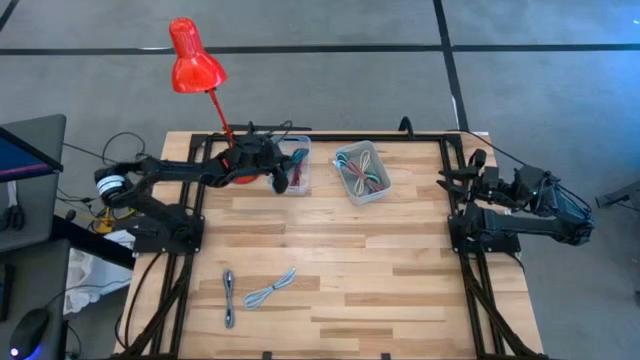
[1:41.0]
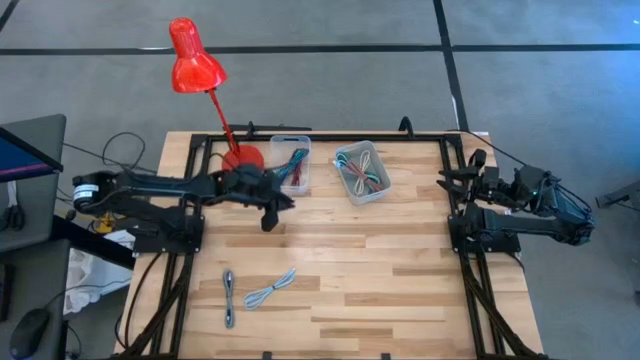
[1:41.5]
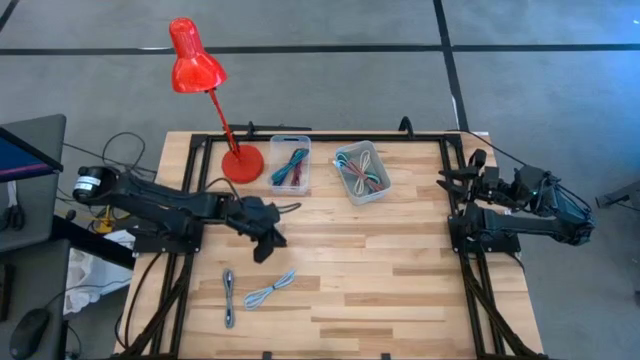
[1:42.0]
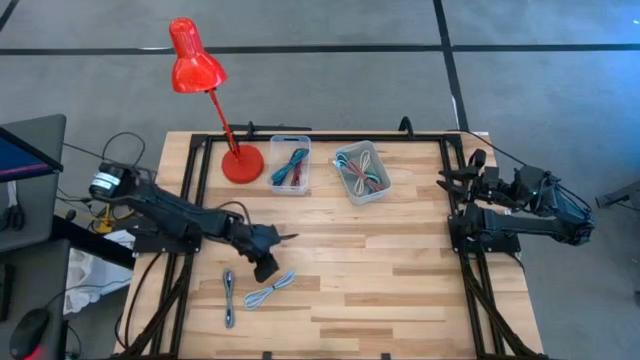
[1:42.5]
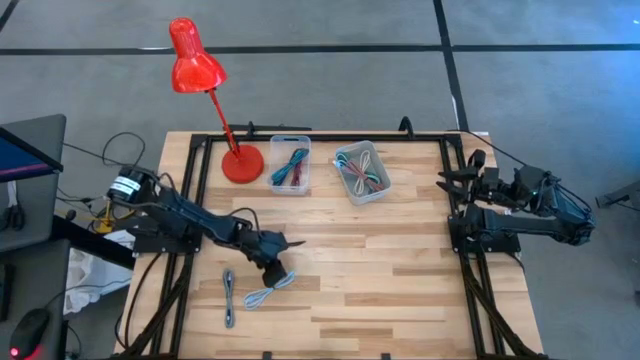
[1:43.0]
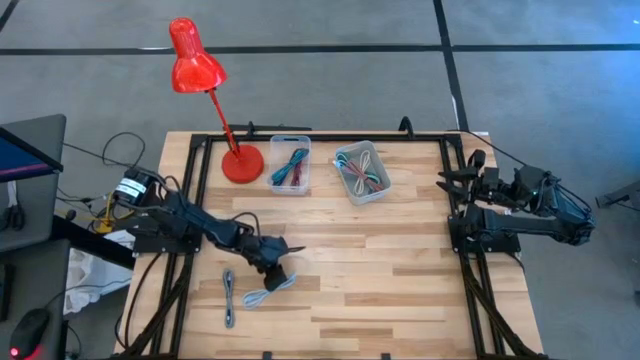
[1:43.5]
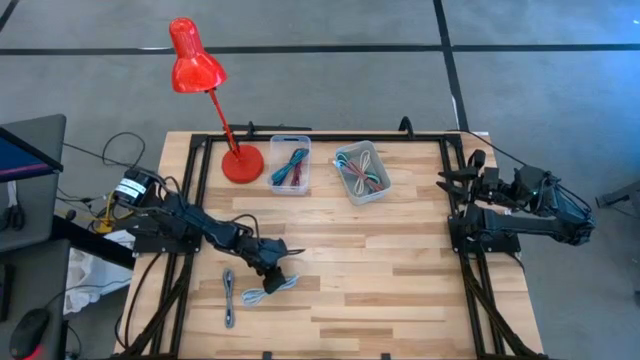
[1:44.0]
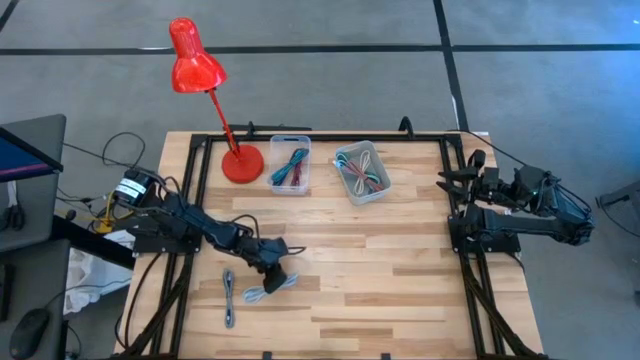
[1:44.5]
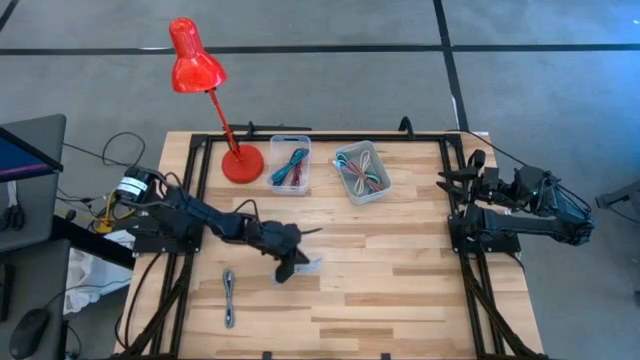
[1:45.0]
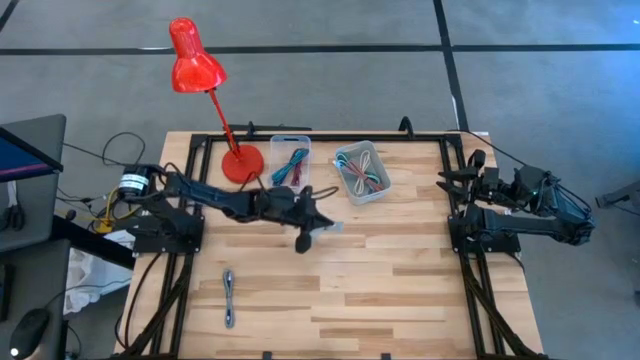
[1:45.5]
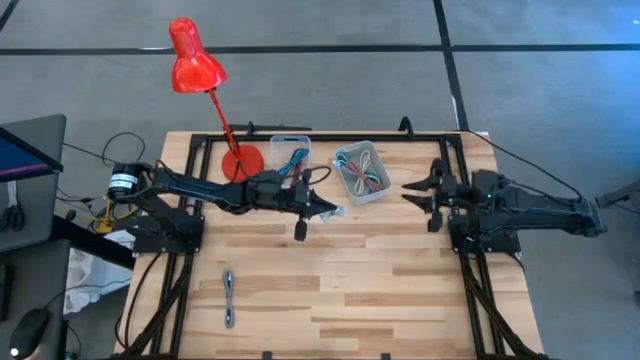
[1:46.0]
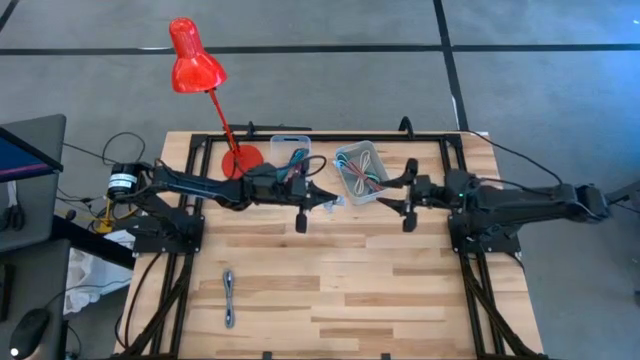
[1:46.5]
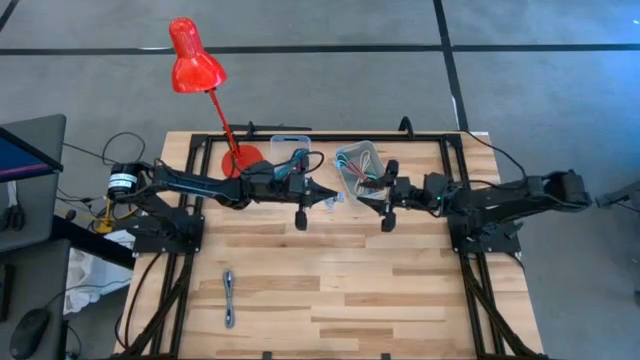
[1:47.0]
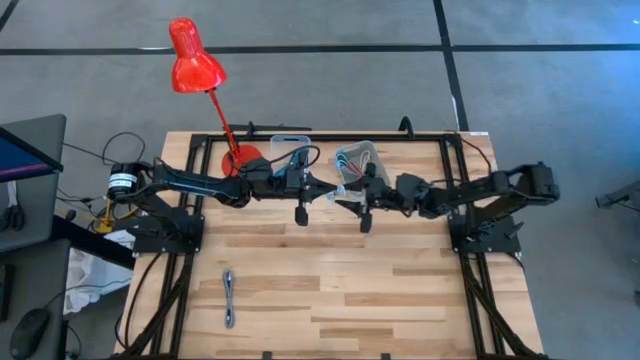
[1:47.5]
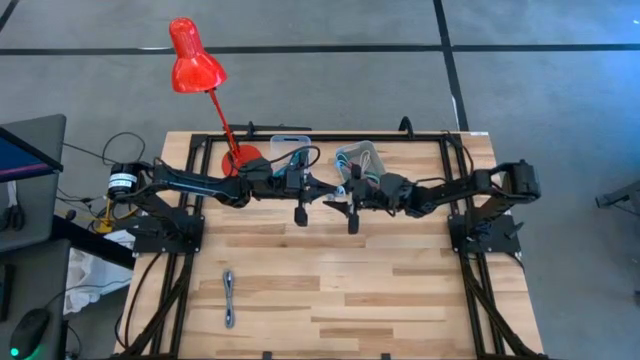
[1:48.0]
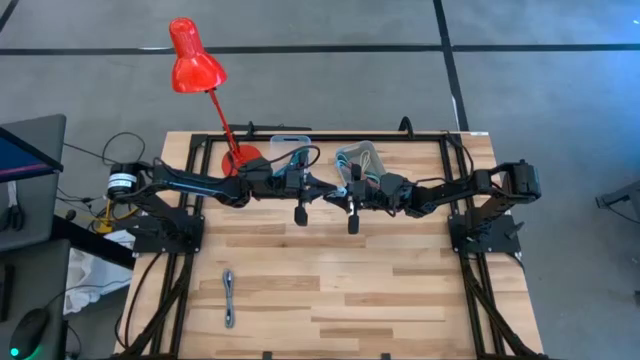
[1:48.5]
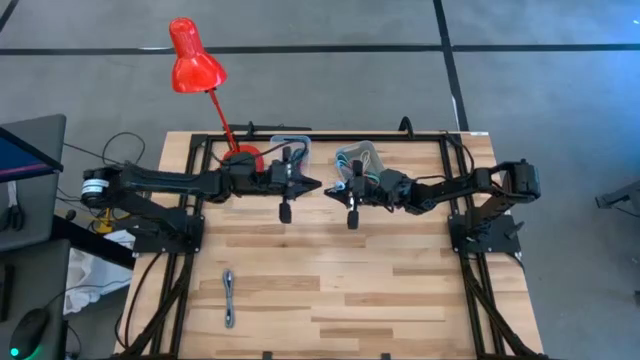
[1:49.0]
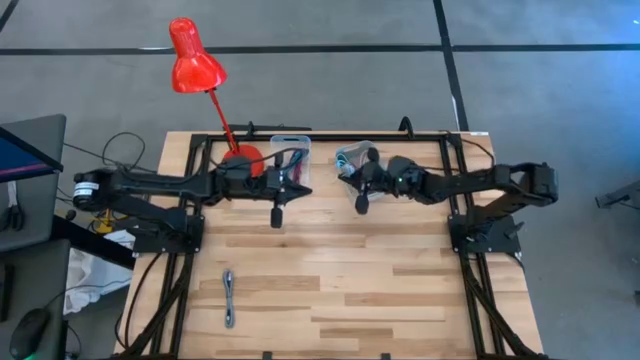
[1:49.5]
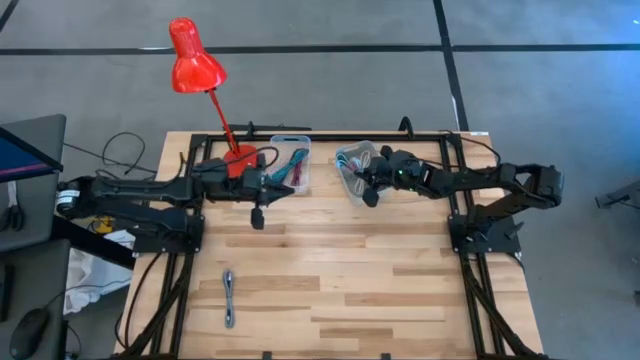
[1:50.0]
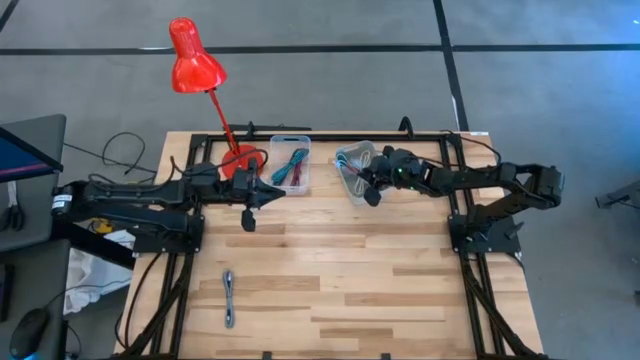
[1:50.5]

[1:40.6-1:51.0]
Task: Pick & Place USB Port
Put the light blue USB cable into the gray bin

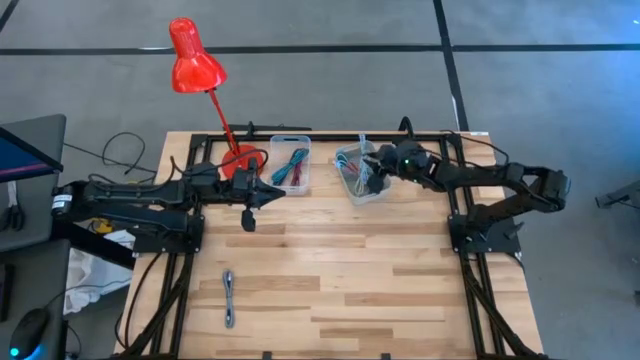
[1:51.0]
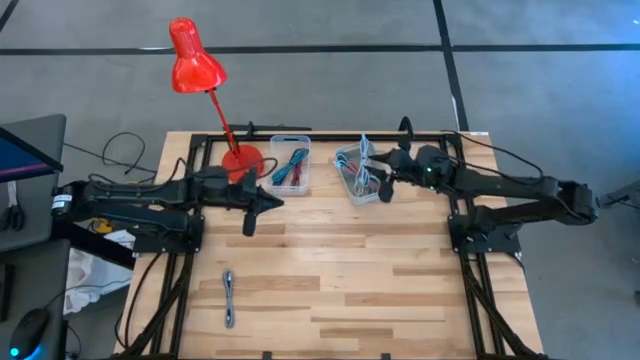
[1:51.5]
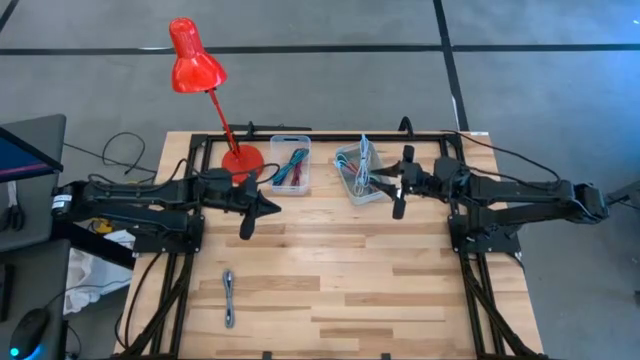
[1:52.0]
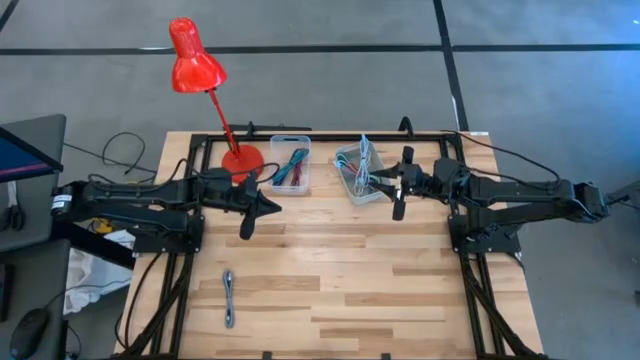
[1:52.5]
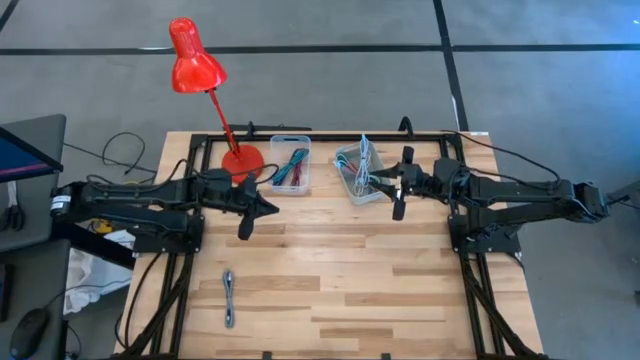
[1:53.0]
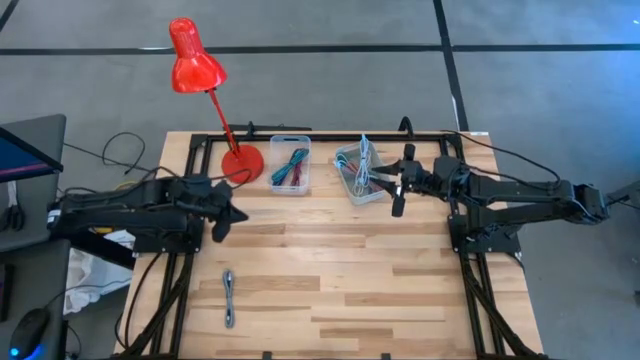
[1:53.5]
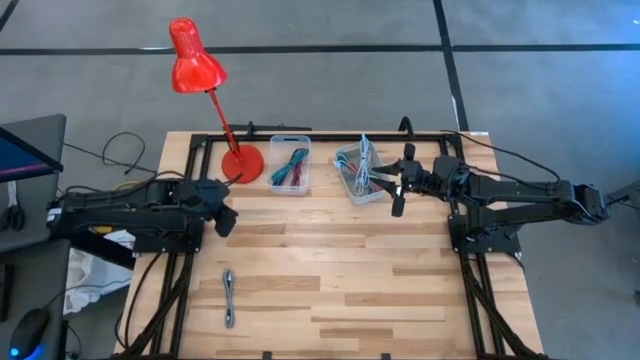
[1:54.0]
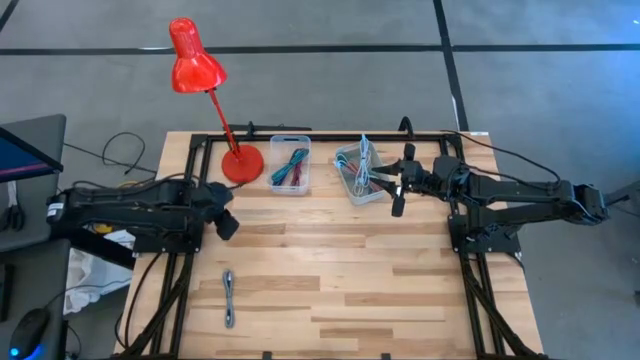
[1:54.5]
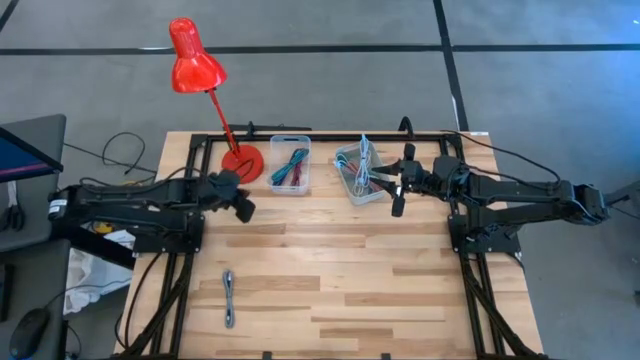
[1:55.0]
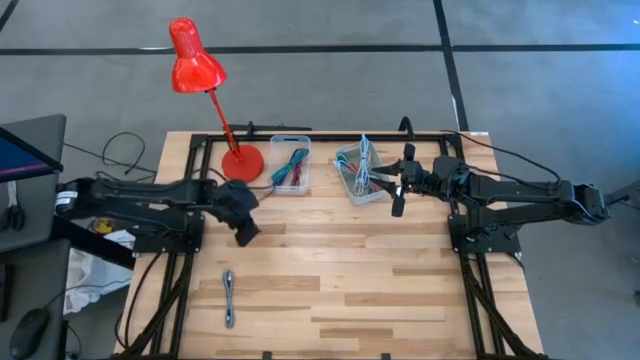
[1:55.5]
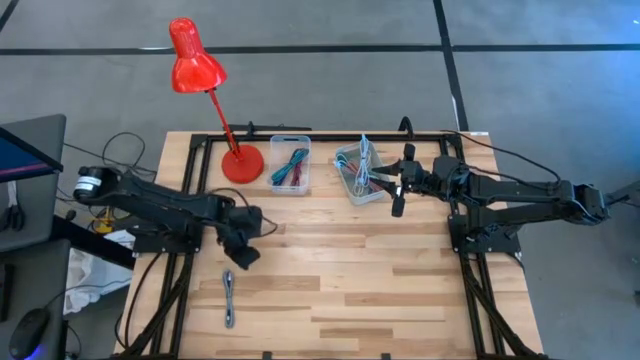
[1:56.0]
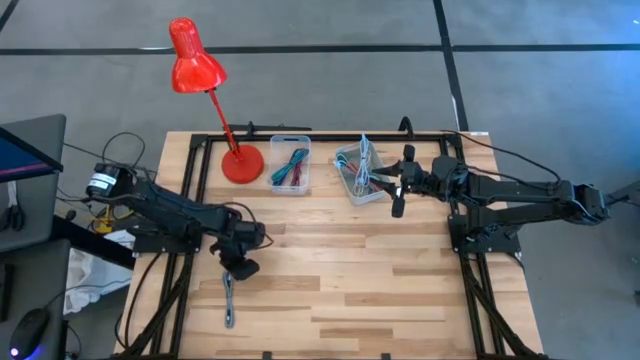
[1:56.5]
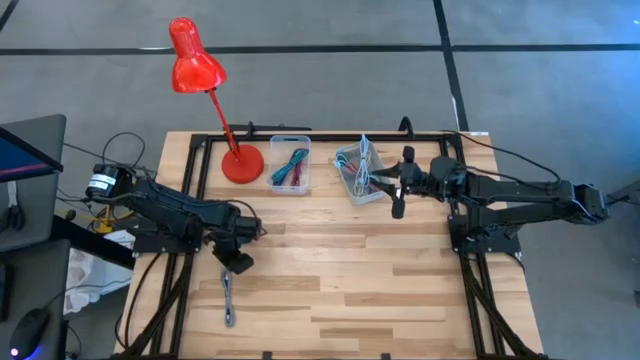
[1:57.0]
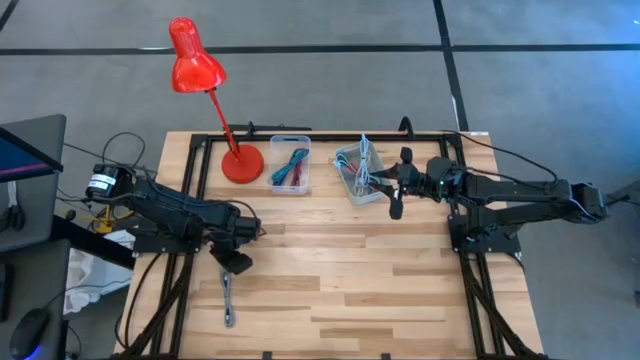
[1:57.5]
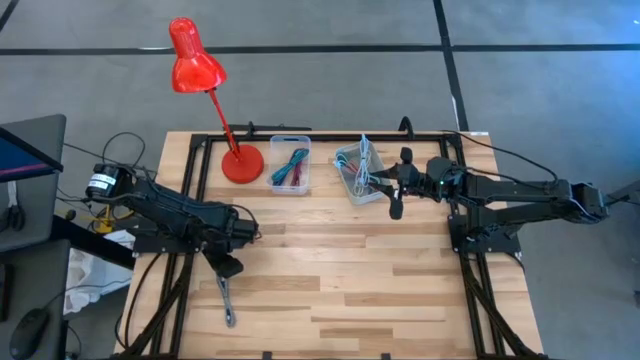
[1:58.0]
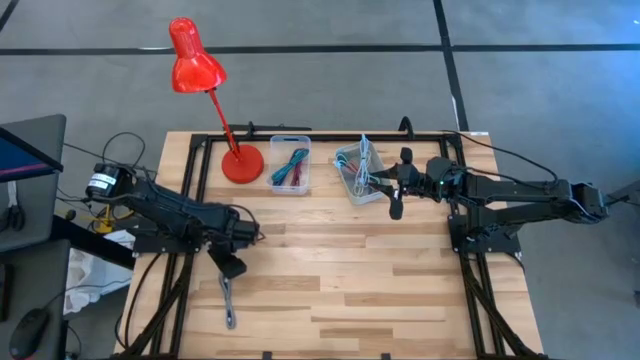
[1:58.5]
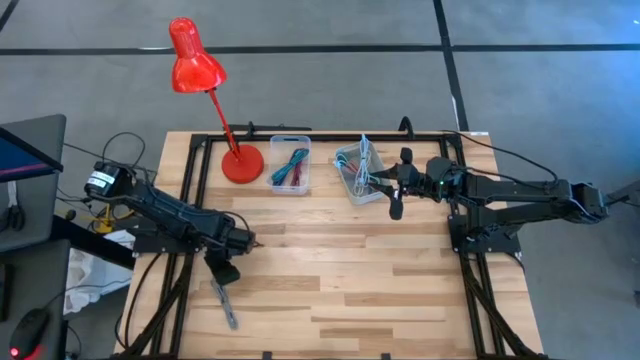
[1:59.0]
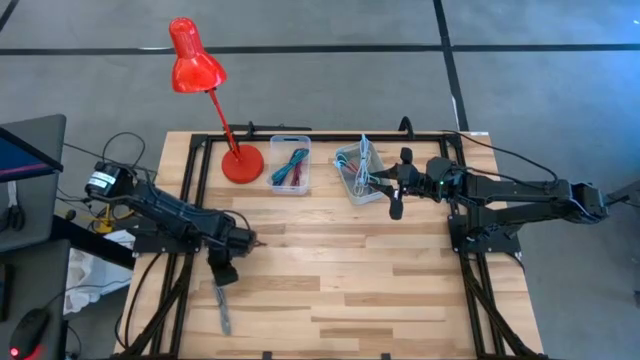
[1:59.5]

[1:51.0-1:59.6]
Put the black patterned USB cable into the transparent bin

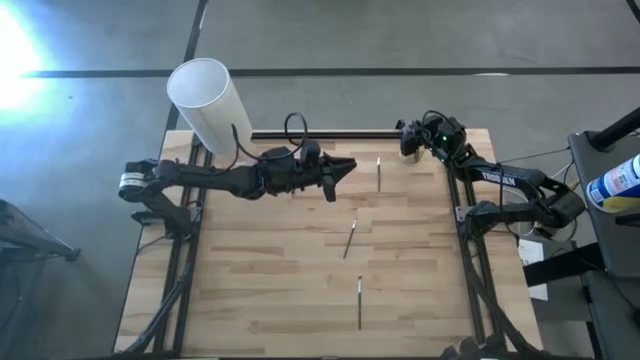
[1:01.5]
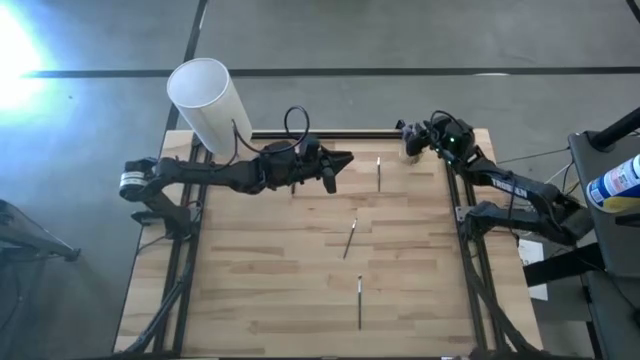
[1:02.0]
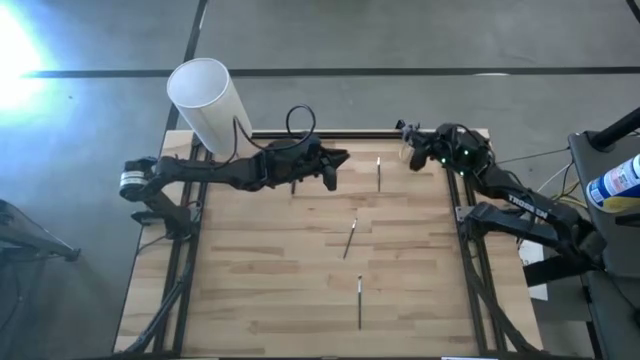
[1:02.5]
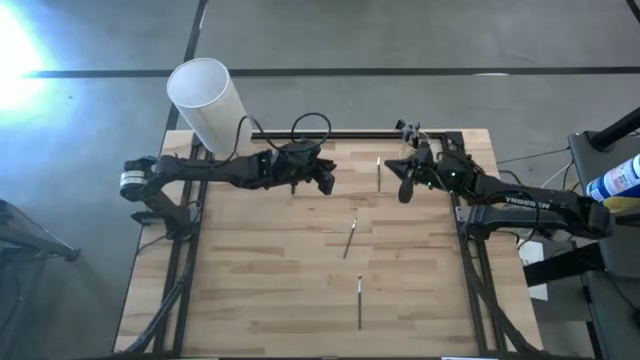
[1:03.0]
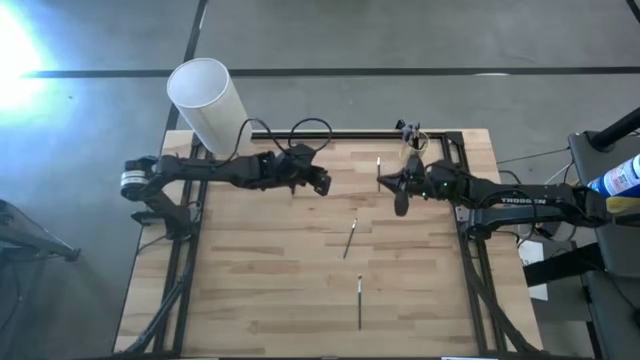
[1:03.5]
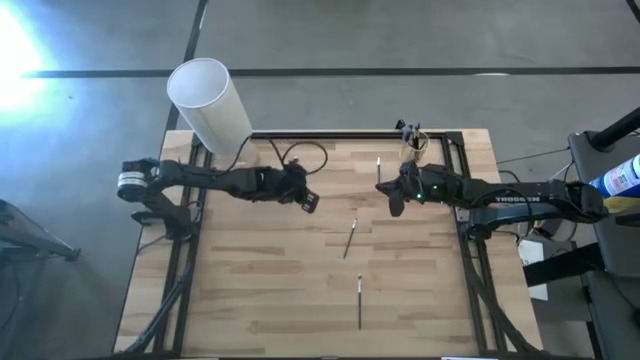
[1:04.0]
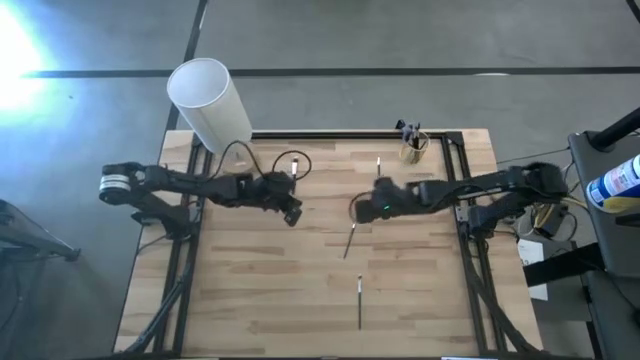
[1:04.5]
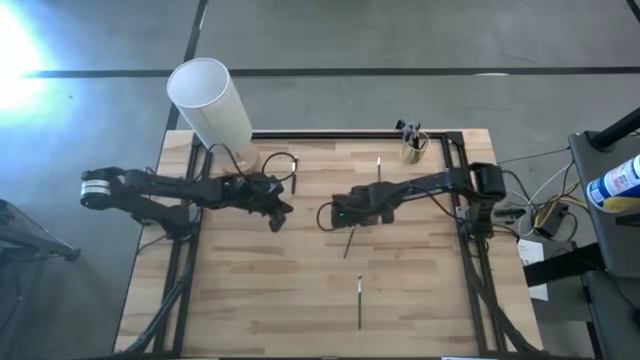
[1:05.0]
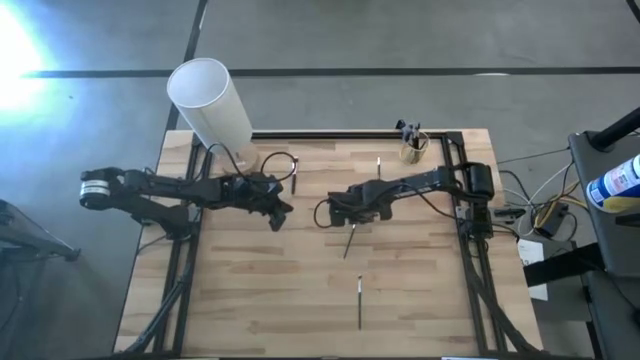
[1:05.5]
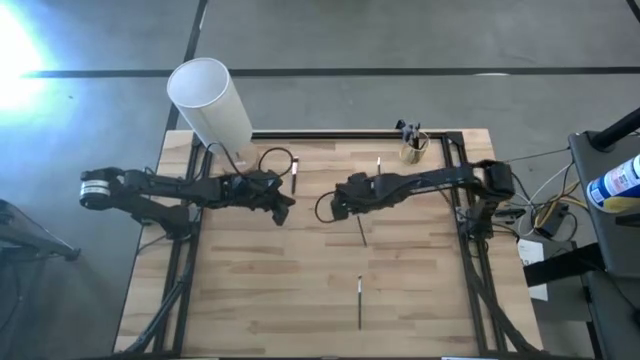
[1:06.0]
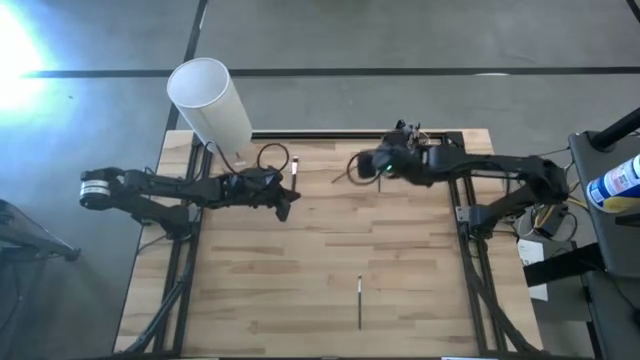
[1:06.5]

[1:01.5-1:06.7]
Task: Put items in baskets/containers
Put the eyeshadow brush into the yellow container
